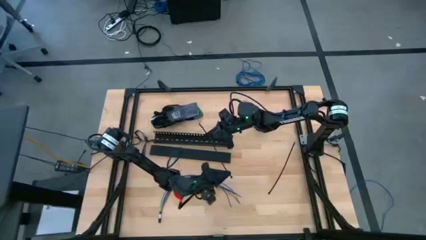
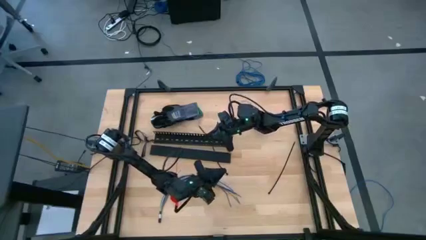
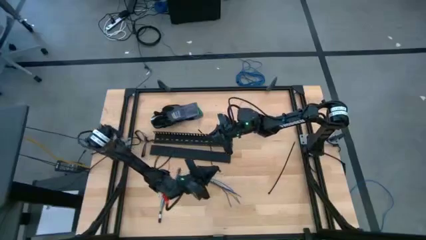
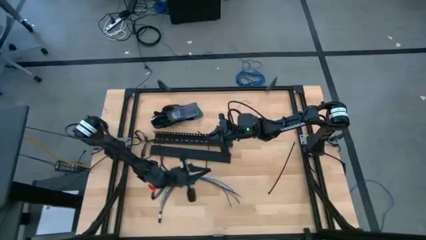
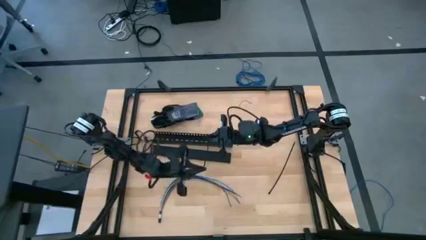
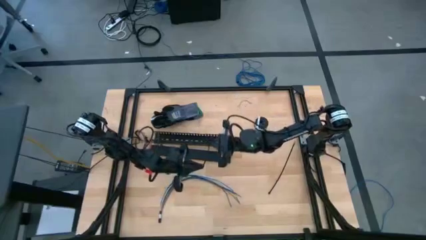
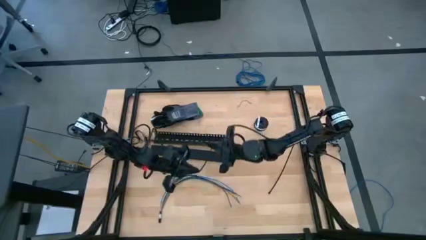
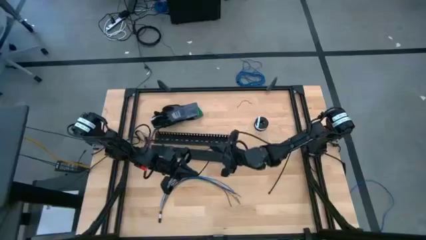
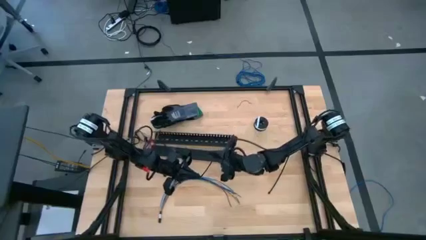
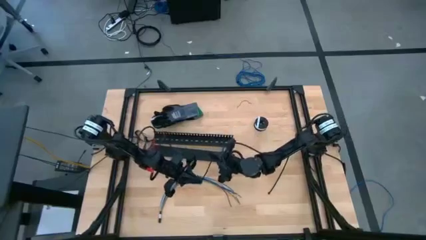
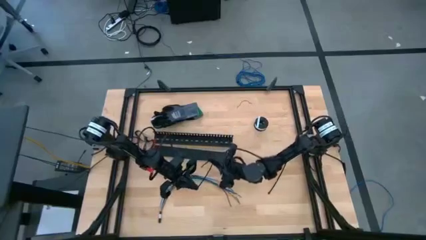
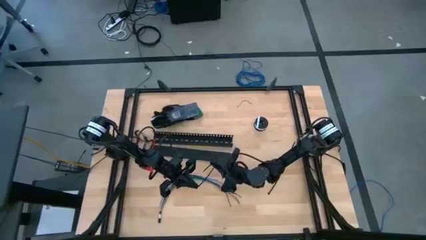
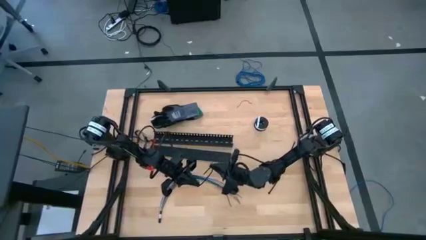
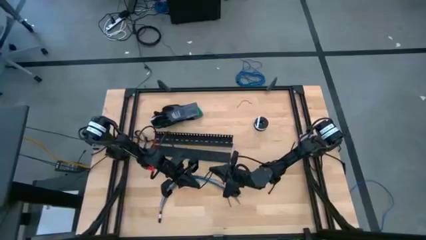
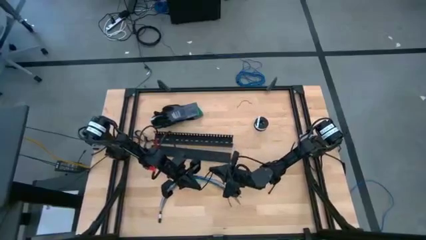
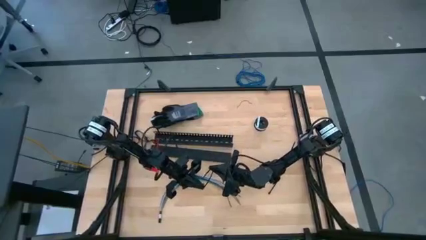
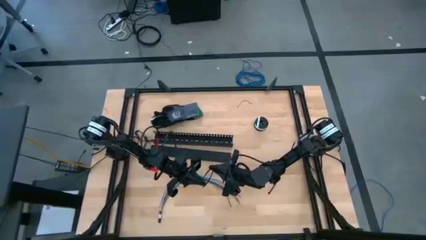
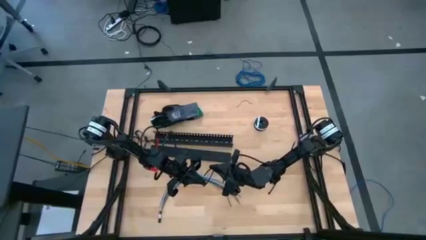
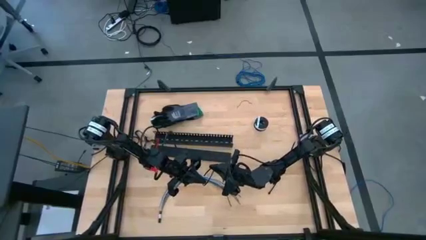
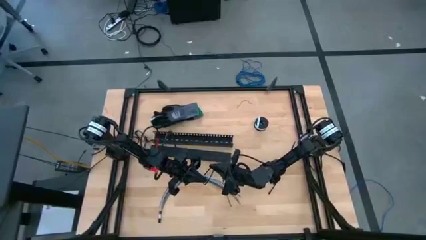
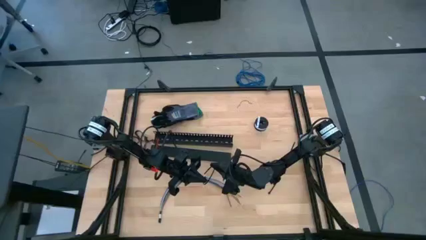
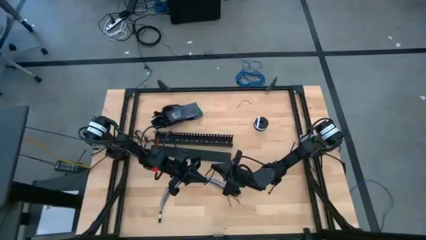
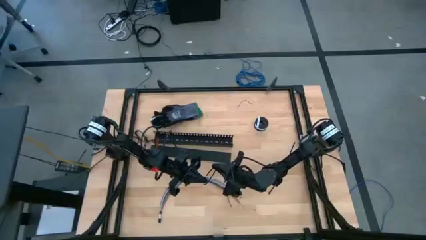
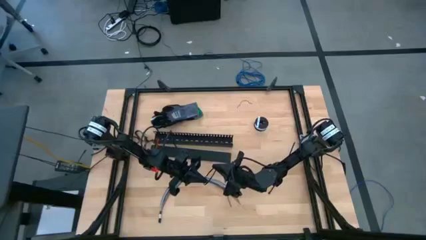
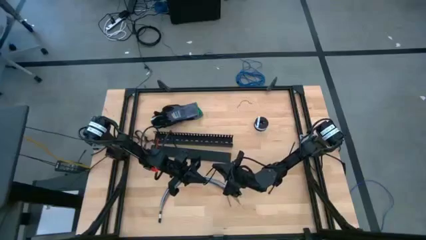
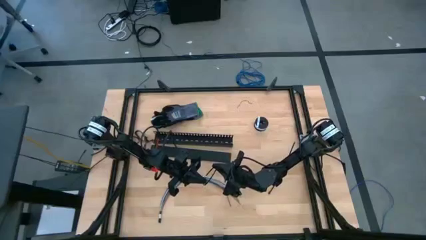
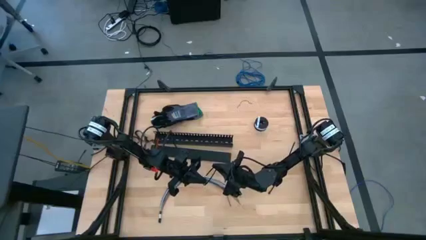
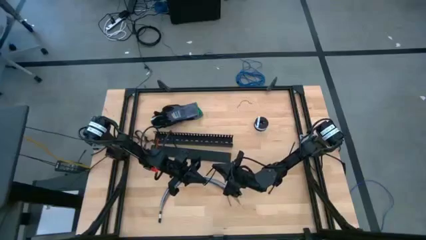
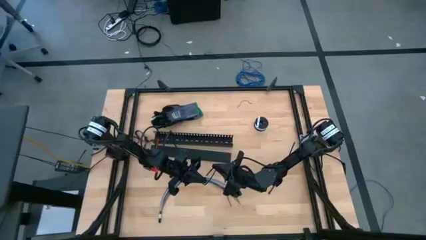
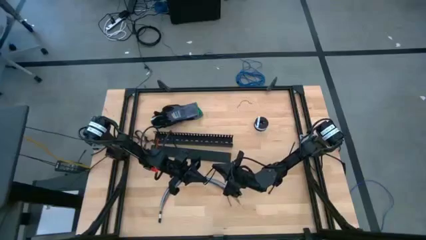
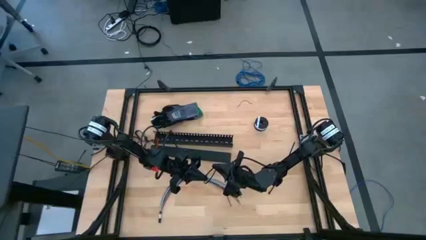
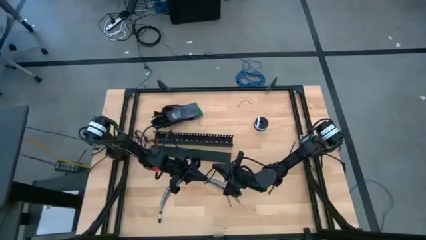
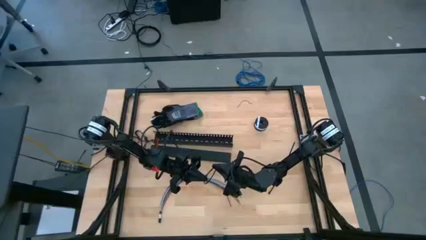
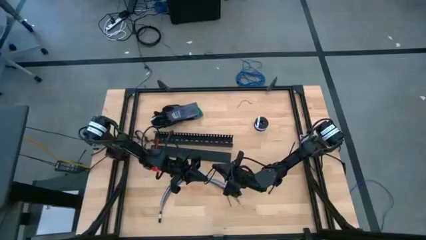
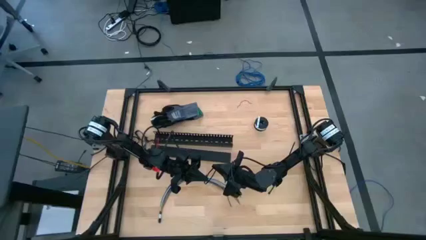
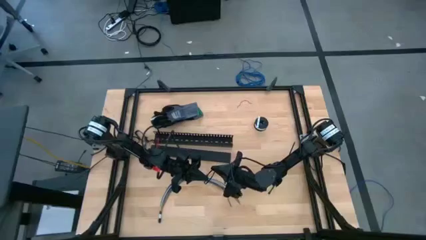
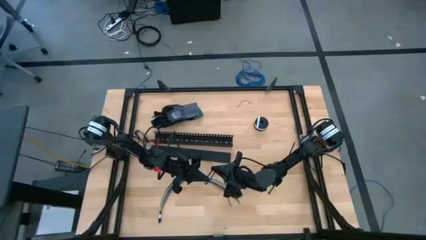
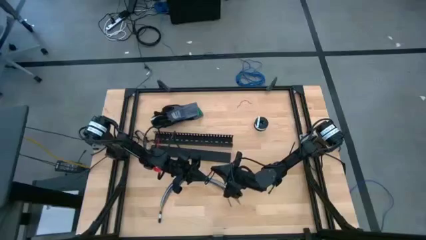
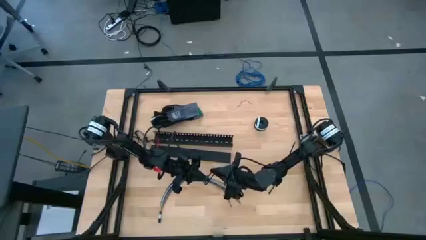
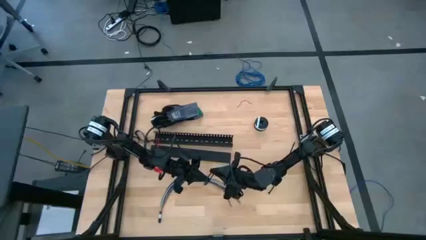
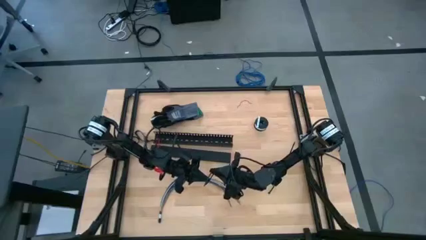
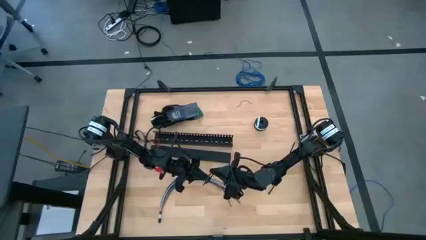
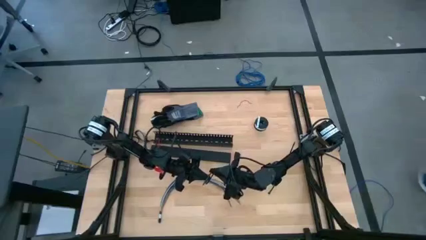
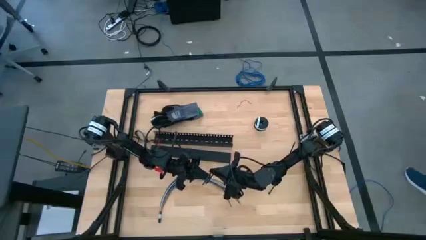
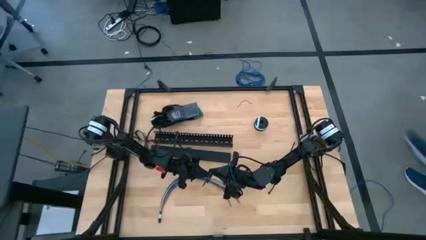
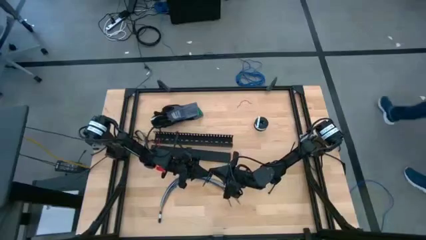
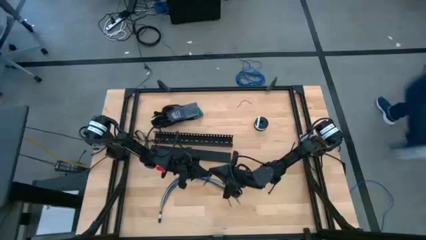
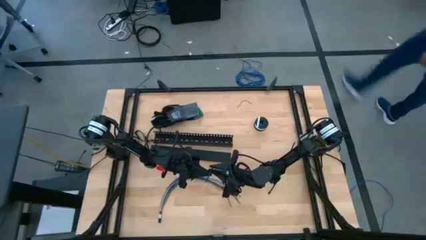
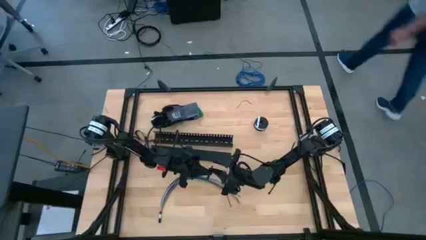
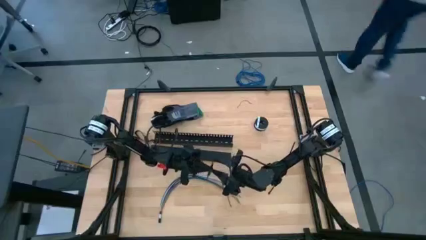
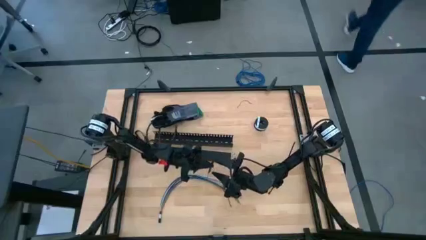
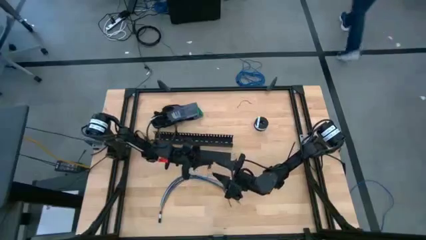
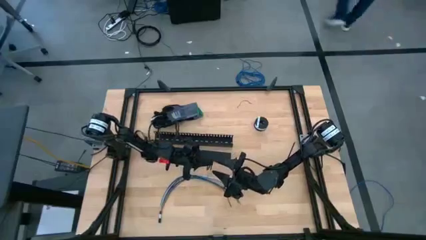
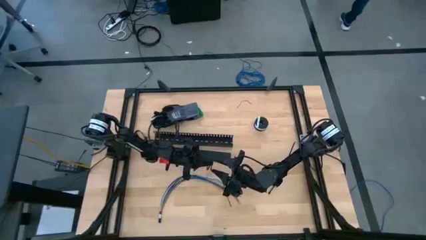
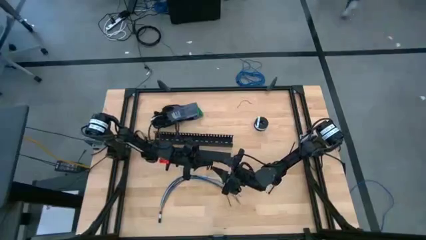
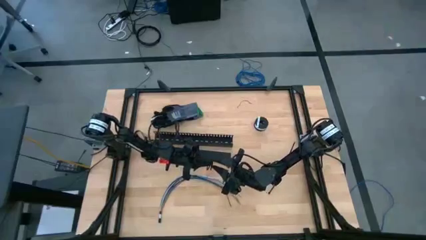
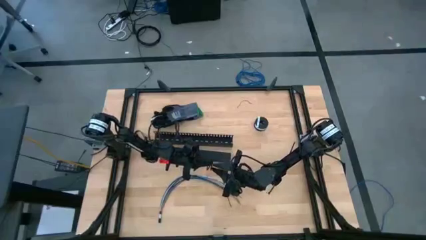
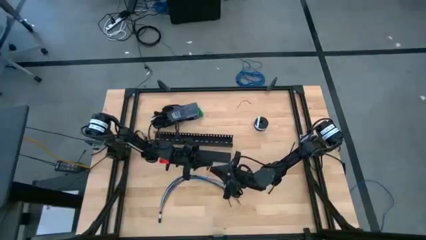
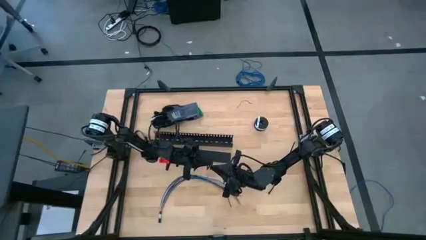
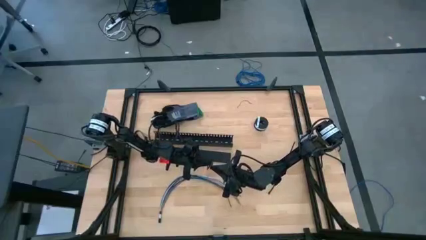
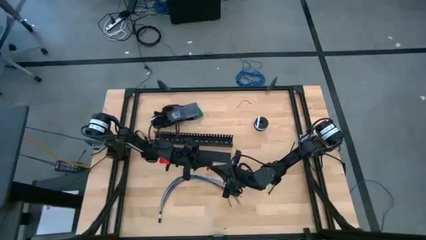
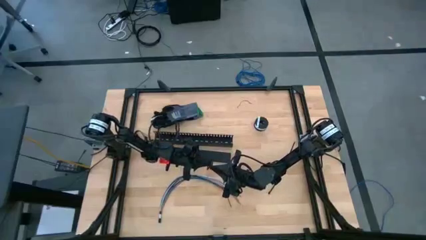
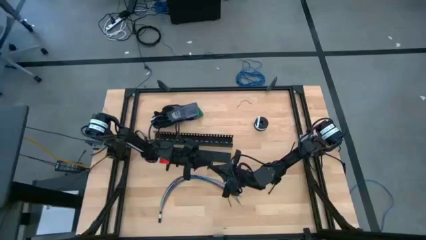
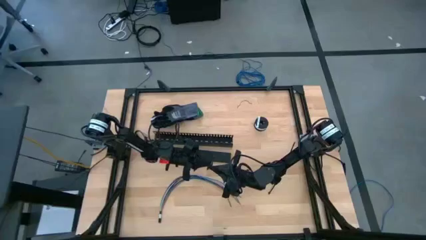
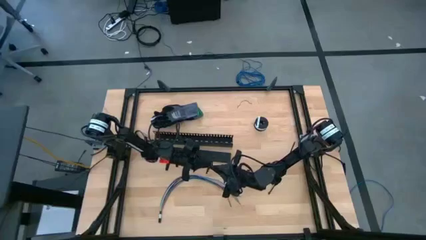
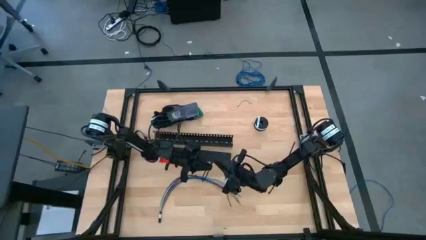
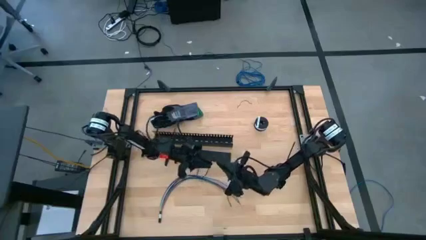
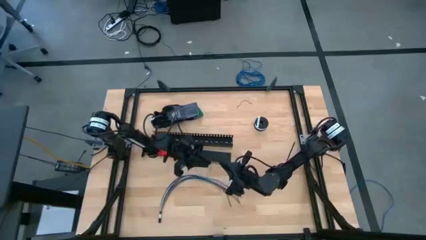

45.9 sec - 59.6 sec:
Task: Ziptie cables
Prepare the left black zip tie

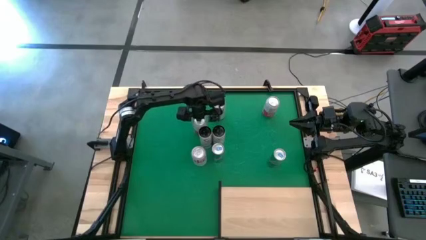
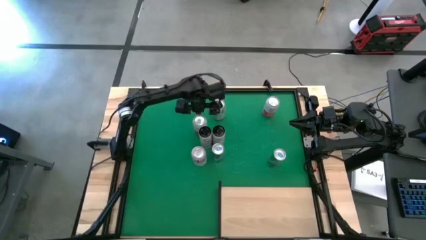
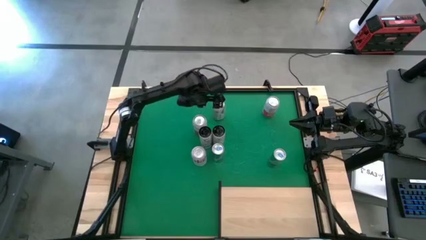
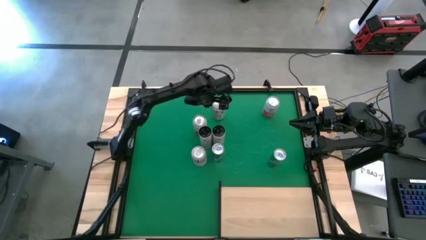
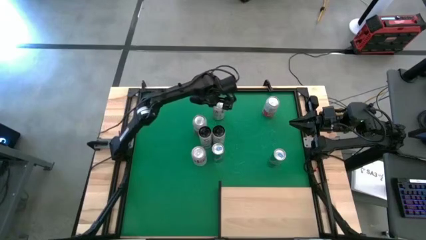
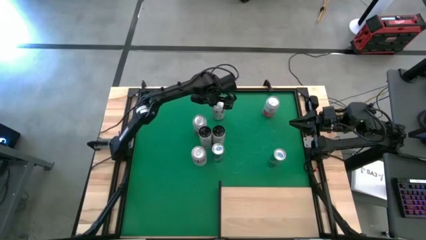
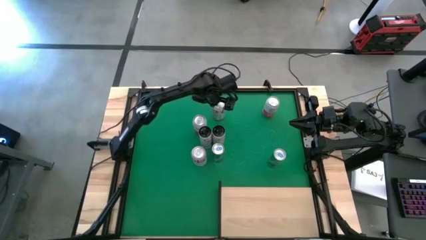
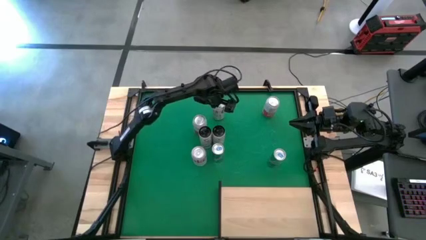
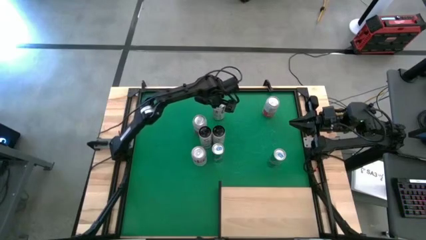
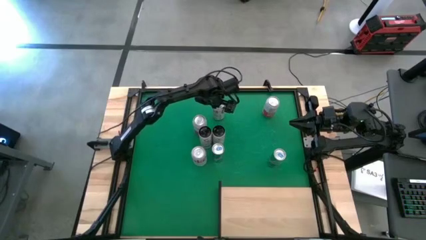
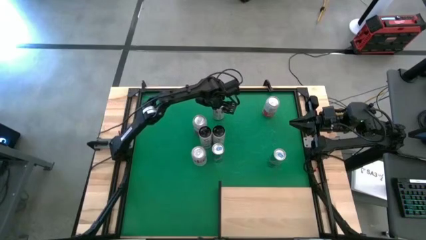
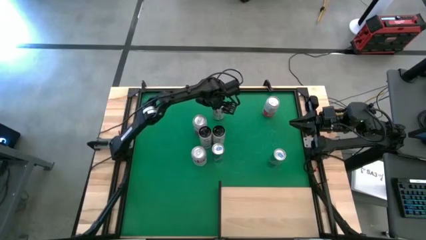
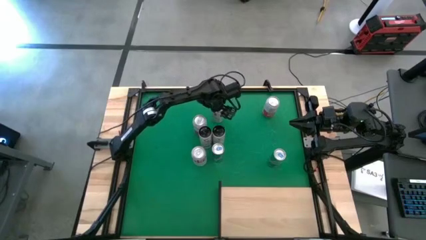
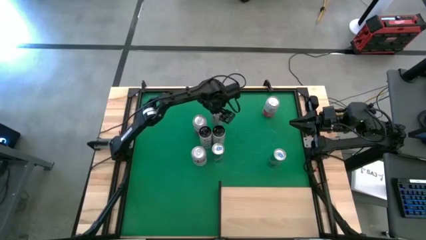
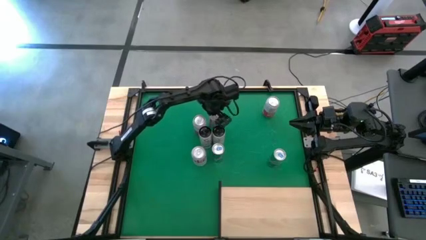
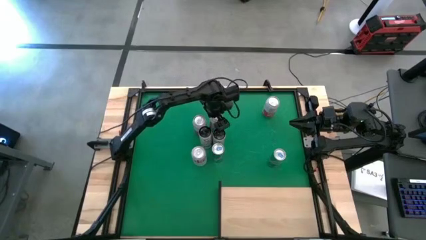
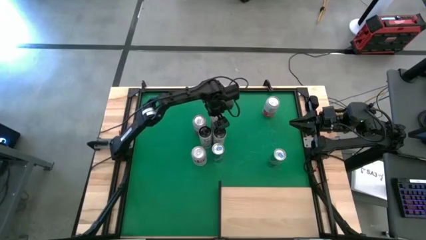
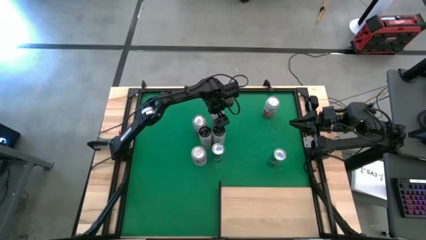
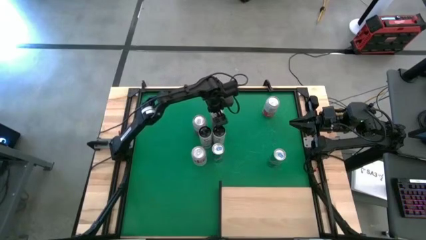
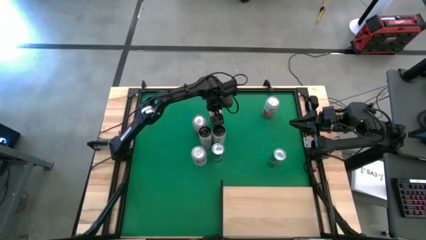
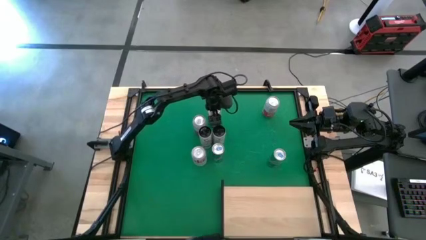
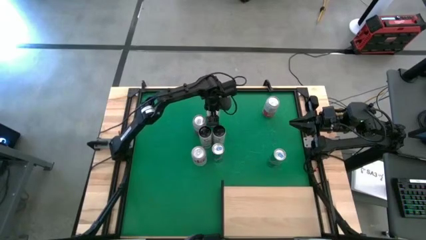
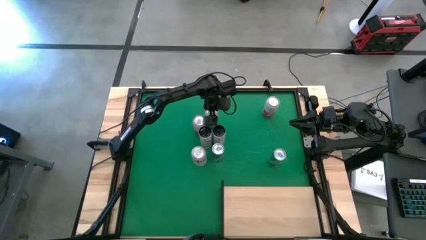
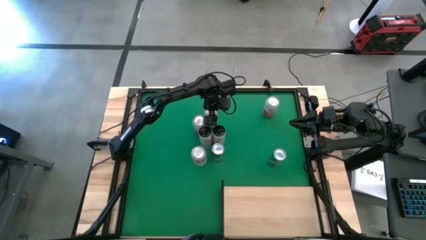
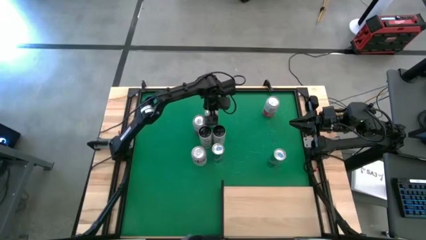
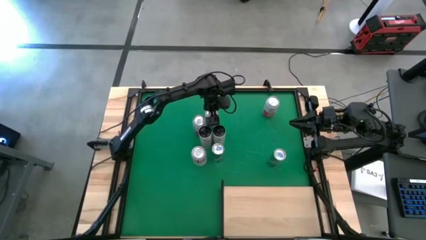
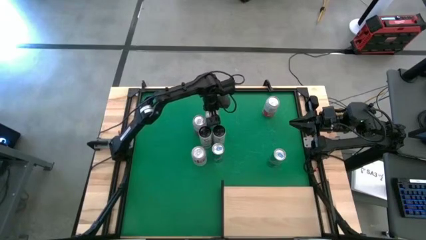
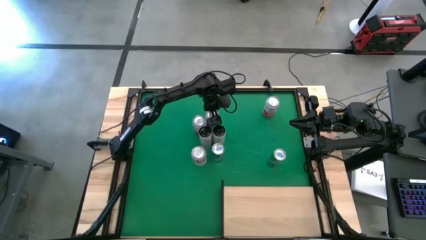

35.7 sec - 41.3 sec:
Task: Place canned beverage on shelf
Adjust the red silver soda can
